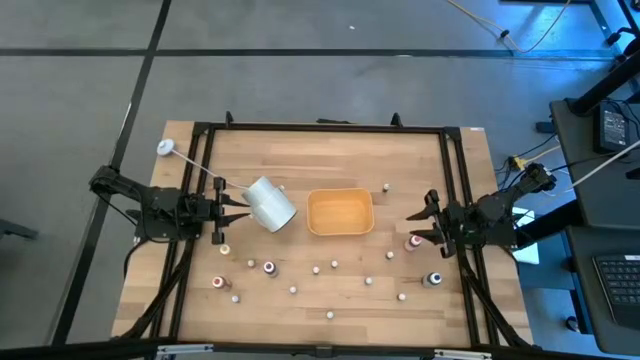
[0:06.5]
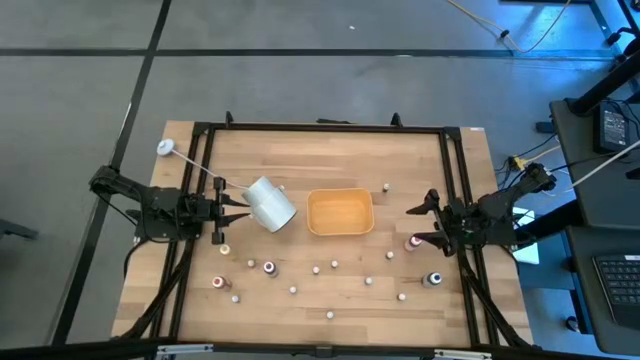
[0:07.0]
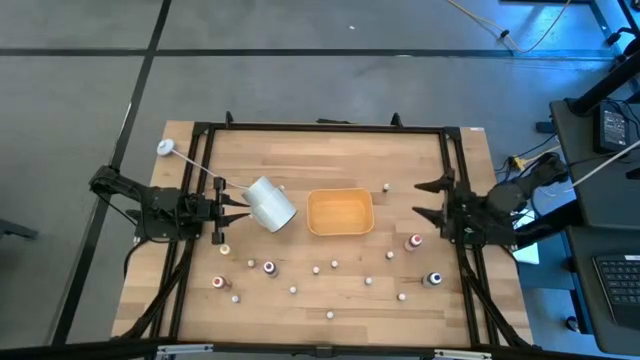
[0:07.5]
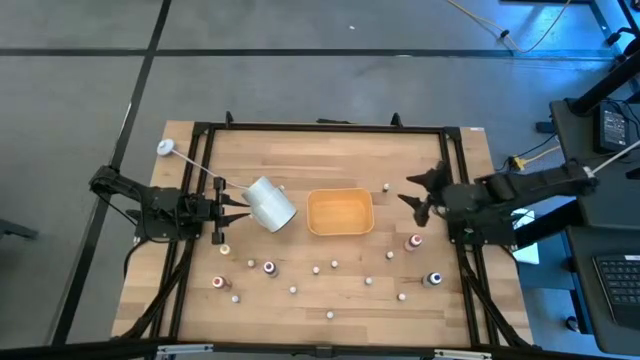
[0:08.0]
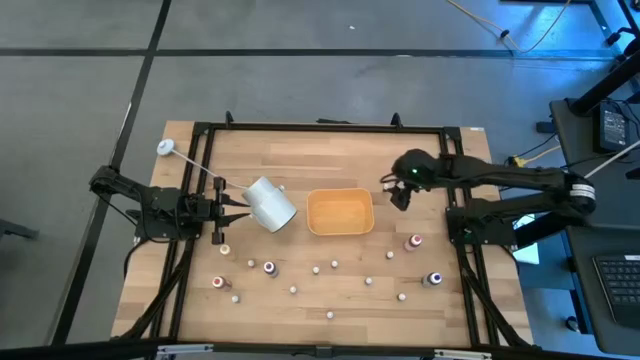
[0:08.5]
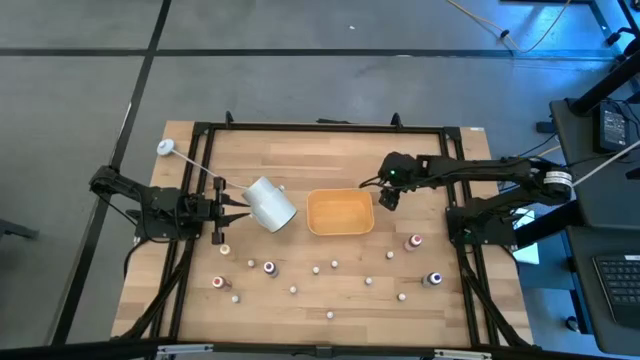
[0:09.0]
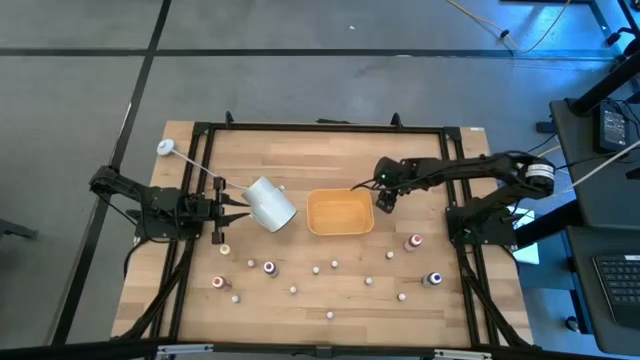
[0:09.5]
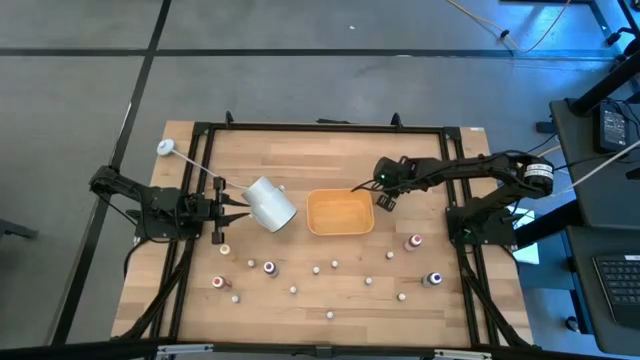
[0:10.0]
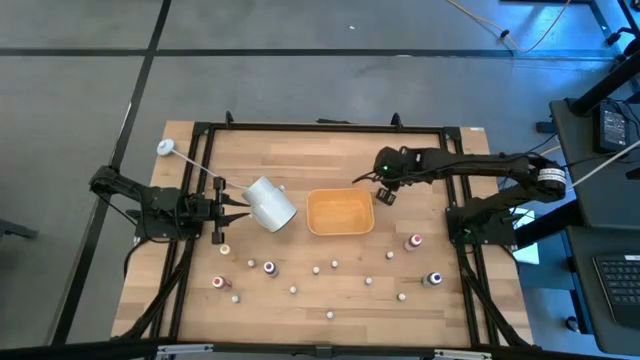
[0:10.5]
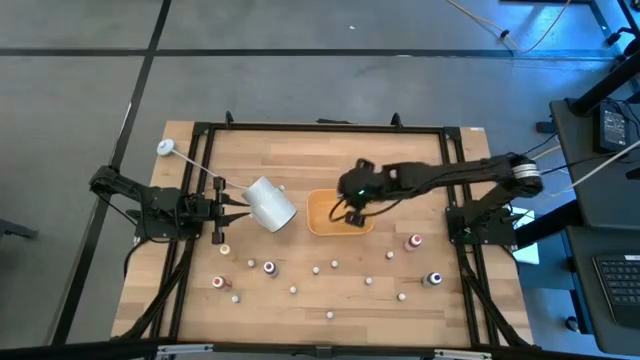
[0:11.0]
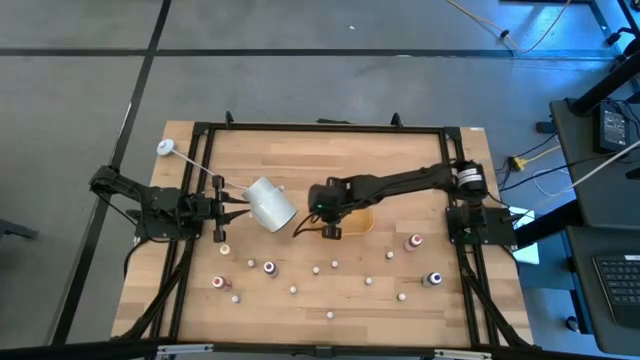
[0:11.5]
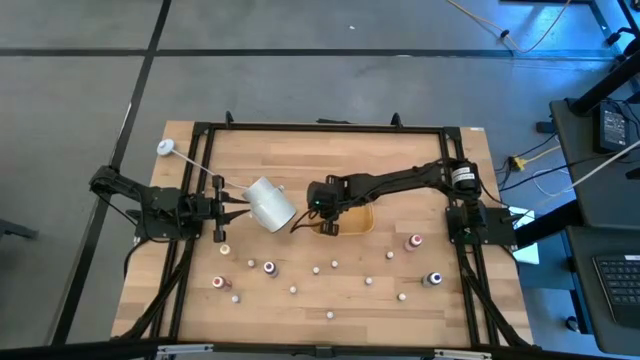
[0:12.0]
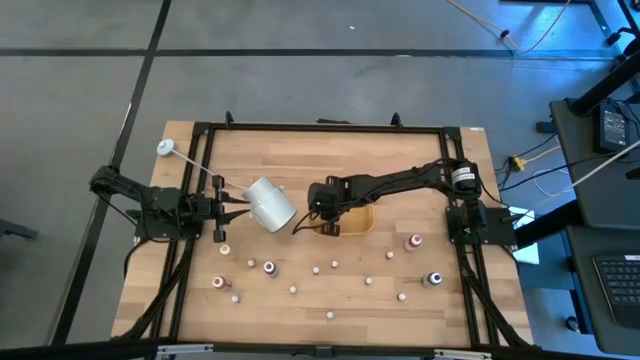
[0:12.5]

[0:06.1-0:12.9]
Task: Pick & Place food coloring
Put the top small black food coloring bottle into the yellow bin

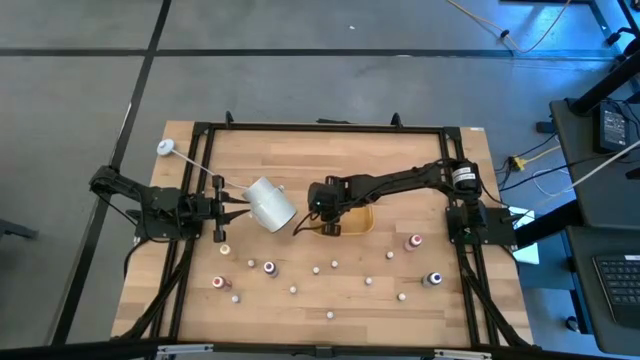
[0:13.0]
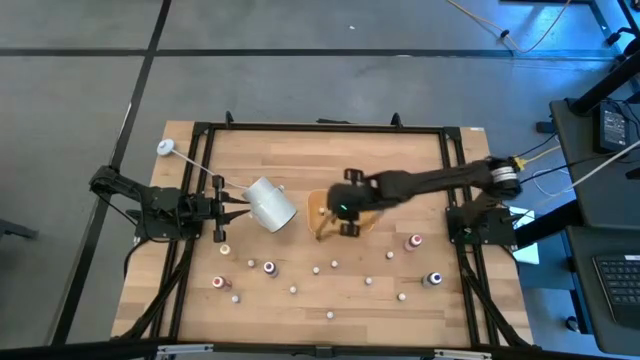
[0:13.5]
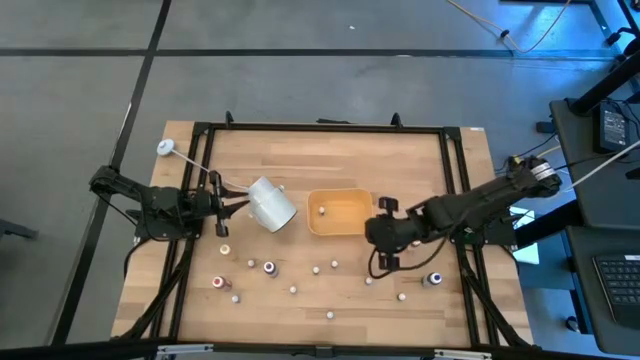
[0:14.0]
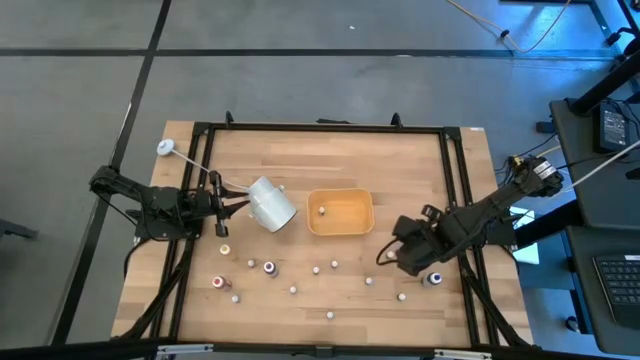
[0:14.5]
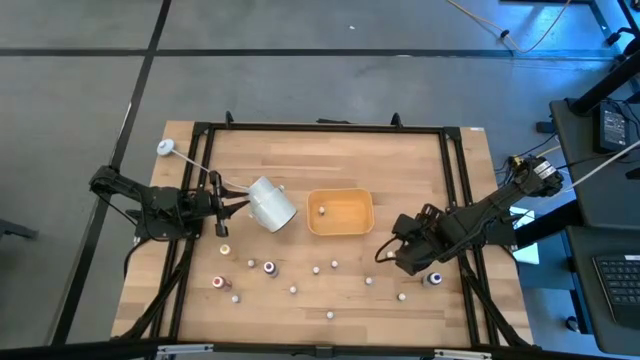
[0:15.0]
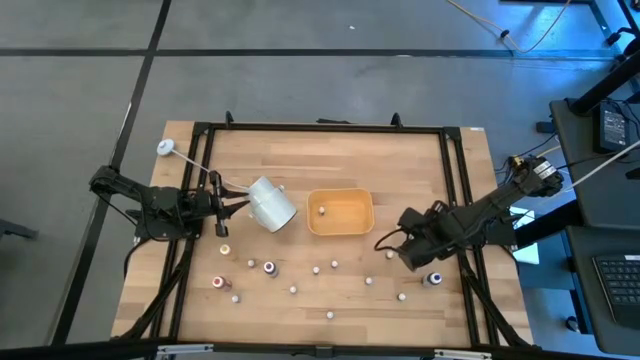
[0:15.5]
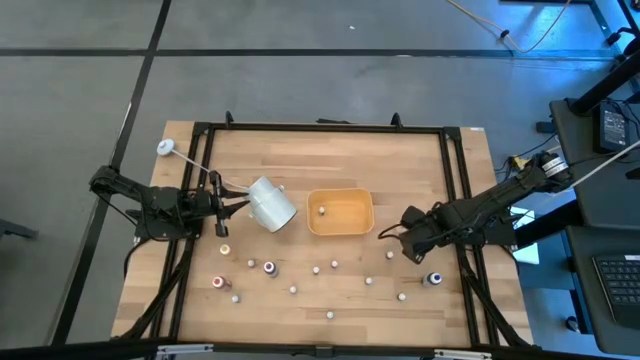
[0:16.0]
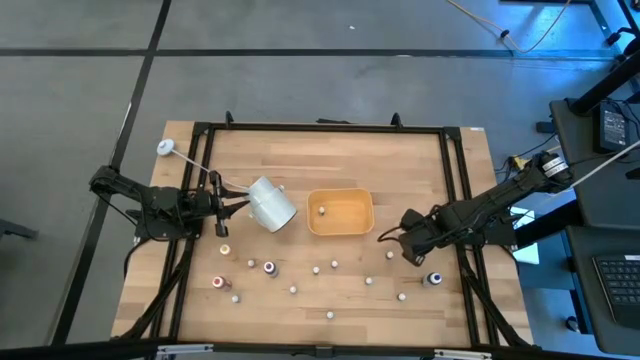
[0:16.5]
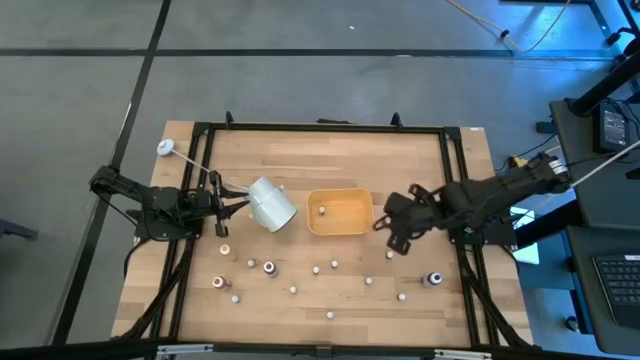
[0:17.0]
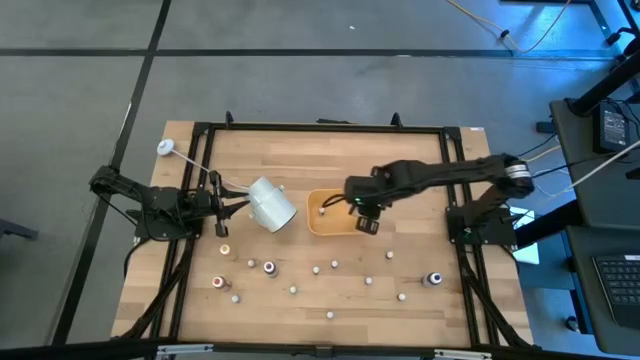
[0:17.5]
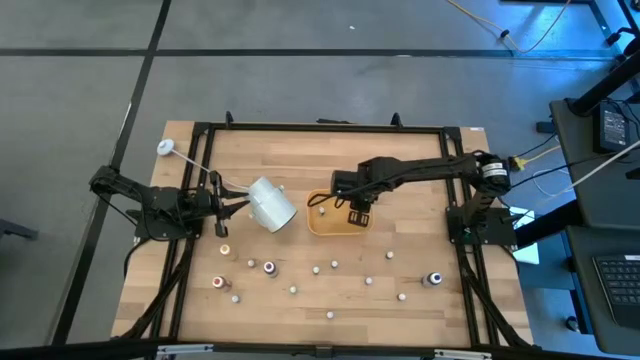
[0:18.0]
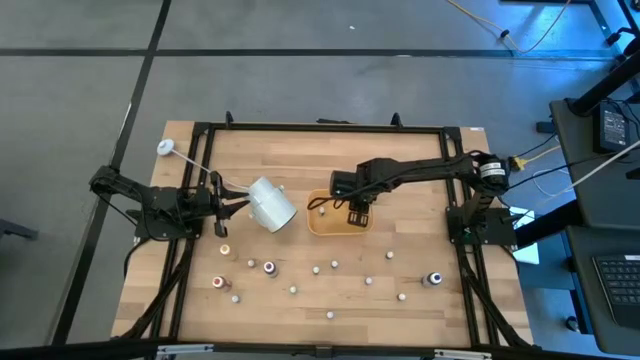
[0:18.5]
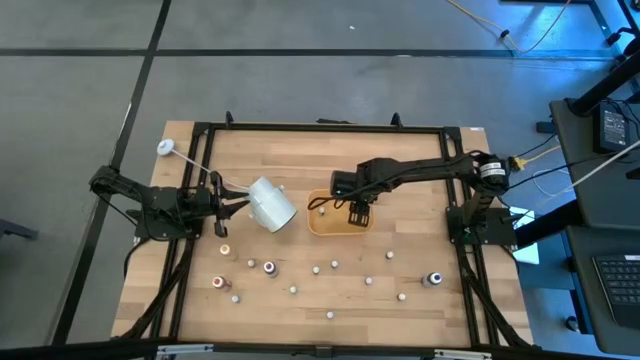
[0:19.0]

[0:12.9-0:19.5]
Put the large pink food coloring bottle into the yellow bin

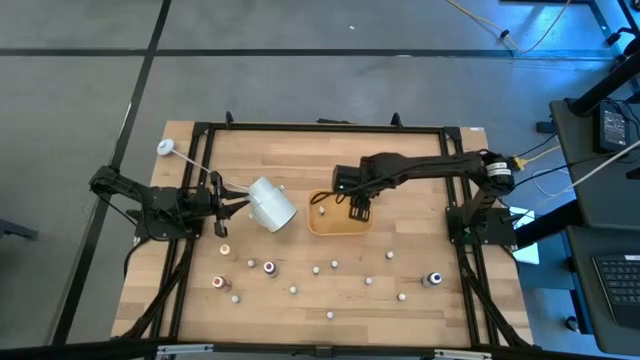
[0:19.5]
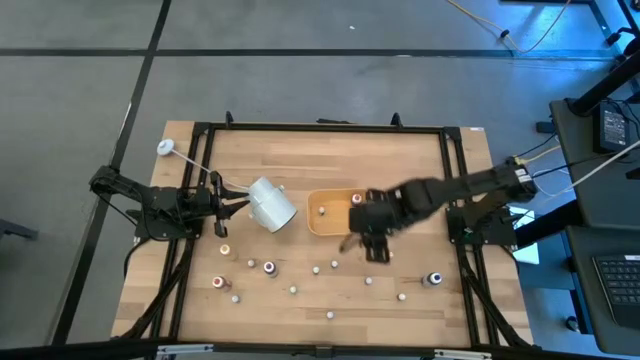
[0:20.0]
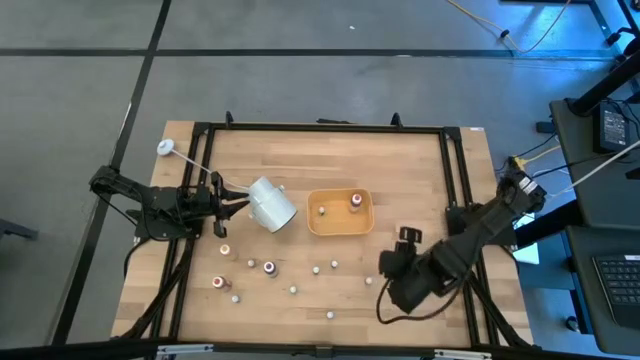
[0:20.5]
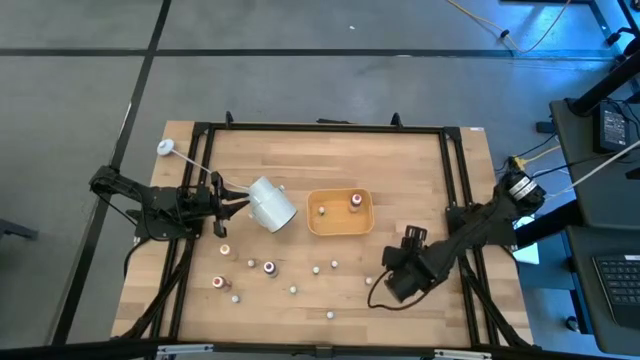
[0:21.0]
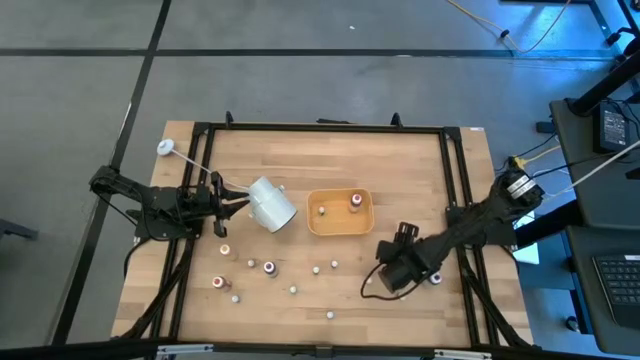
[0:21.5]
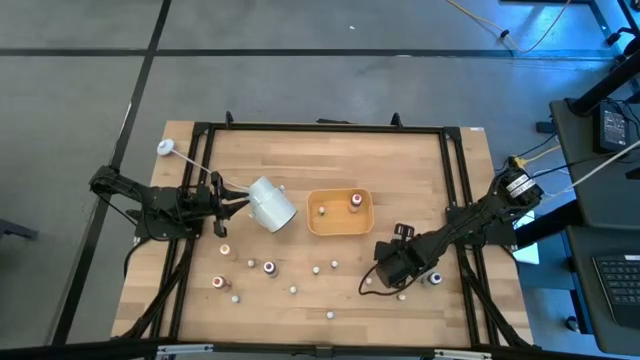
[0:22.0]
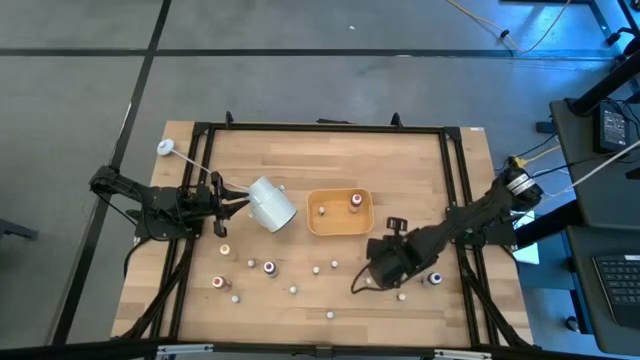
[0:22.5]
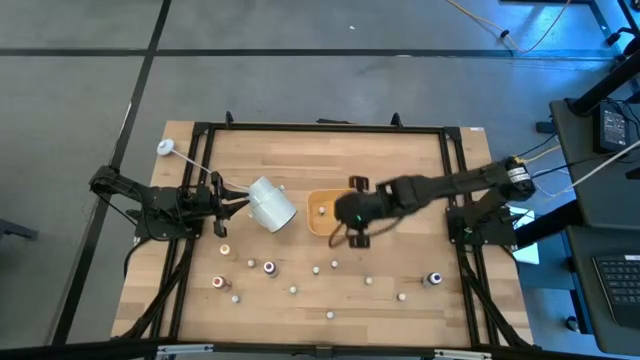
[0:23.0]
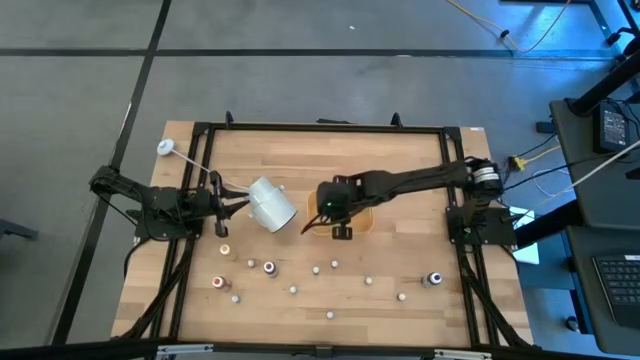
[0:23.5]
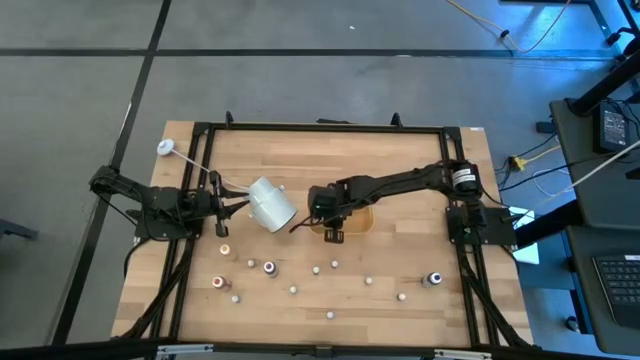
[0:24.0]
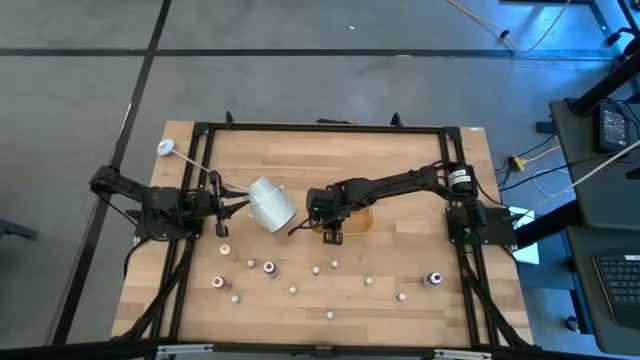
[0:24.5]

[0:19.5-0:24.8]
Put the top small black food coloring bottle into the yellow bin

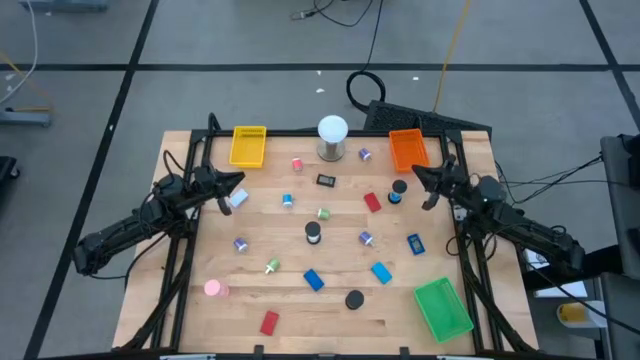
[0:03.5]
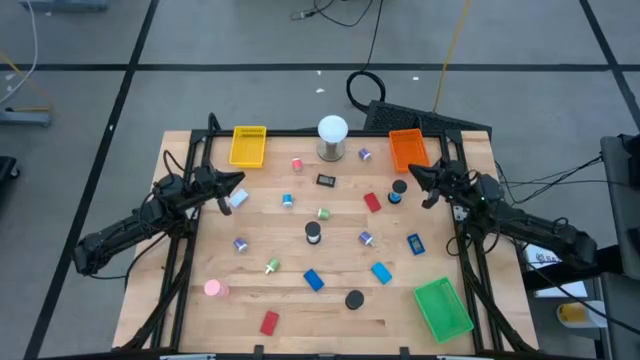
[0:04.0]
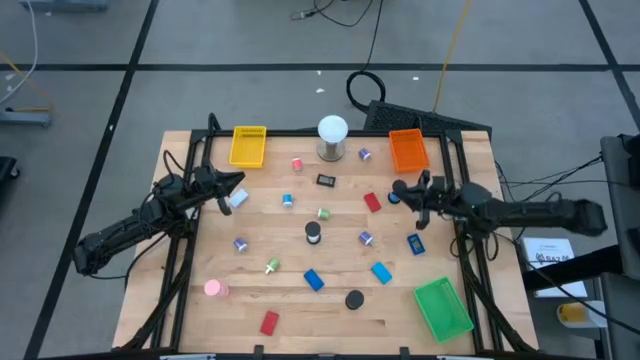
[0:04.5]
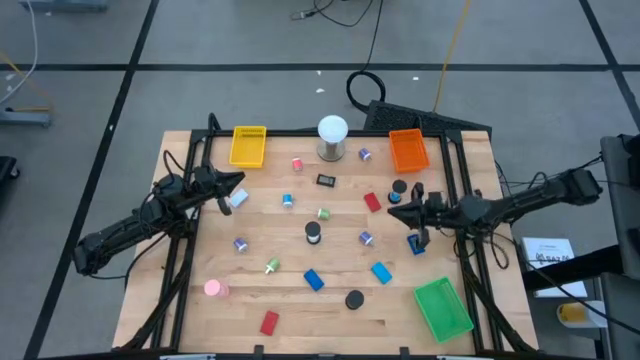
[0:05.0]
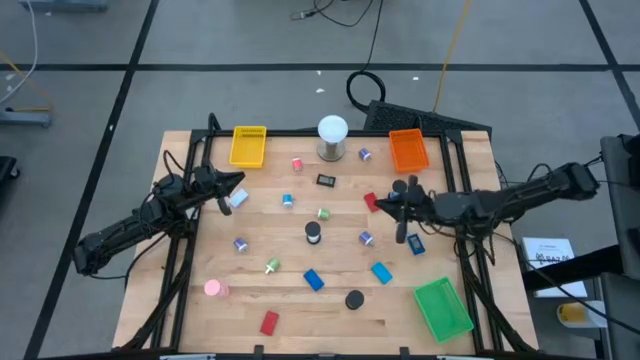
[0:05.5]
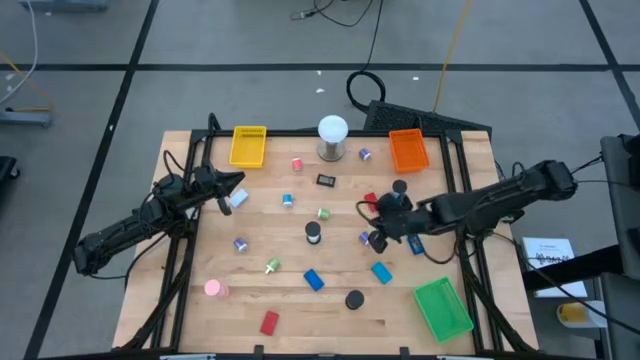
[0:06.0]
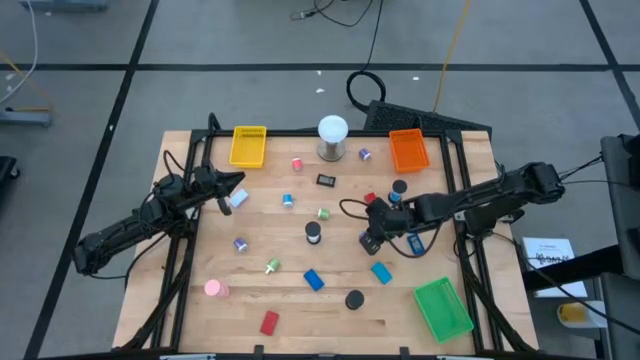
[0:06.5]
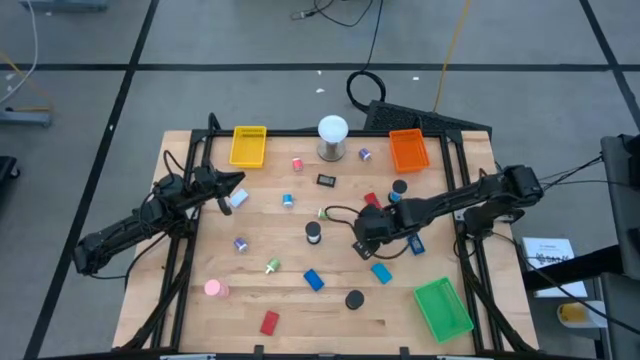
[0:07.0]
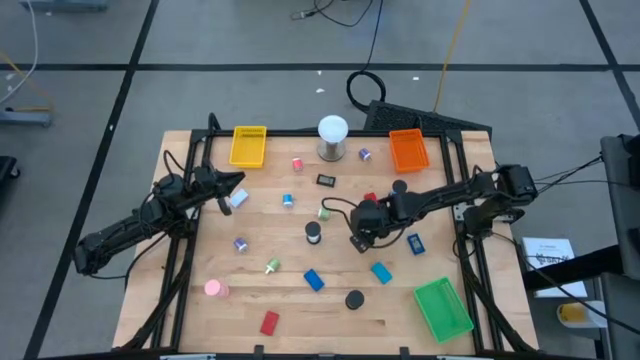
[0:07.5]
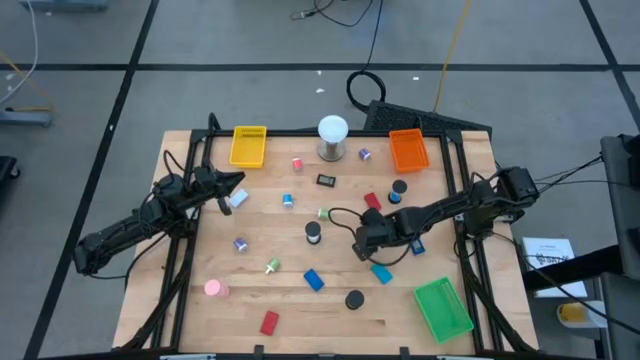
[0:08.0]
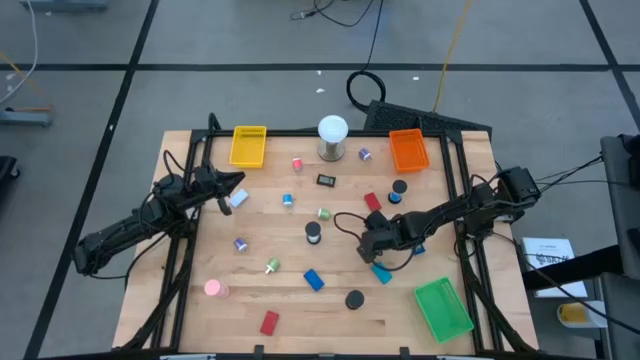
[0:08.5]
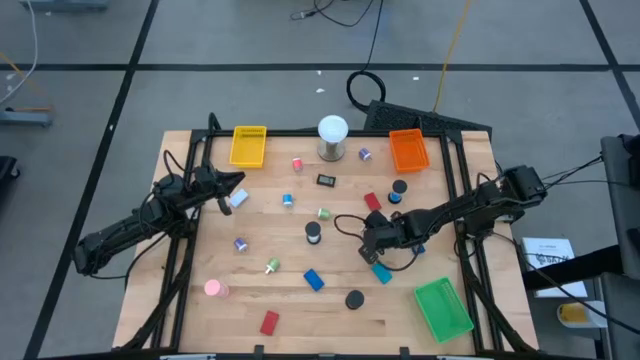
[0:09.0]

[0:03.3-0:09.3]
Task: Pick & Place Office items
Put the bottom right violet charger adaptor into the orange bin
